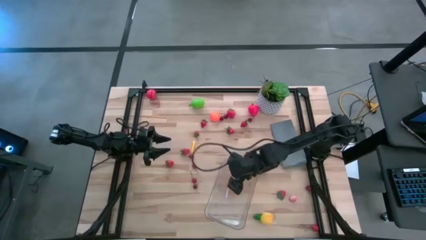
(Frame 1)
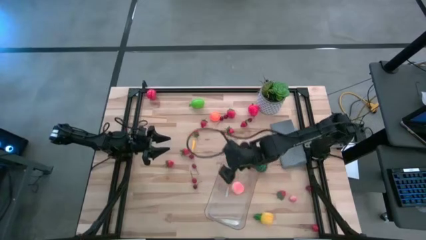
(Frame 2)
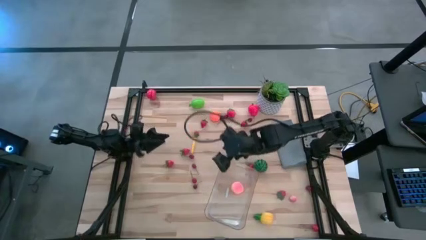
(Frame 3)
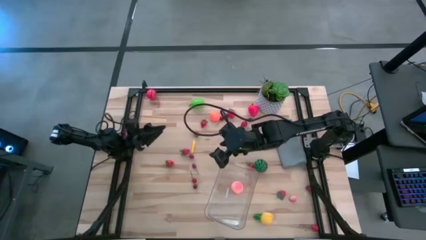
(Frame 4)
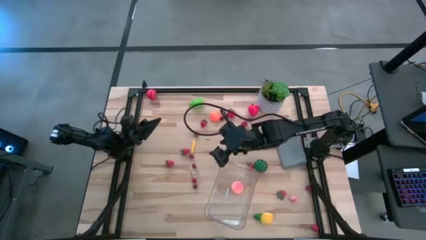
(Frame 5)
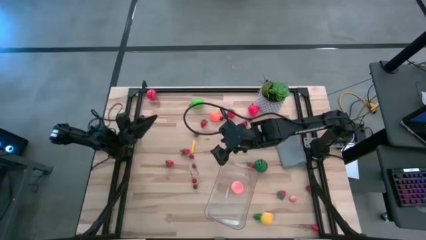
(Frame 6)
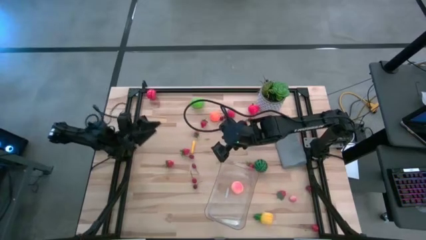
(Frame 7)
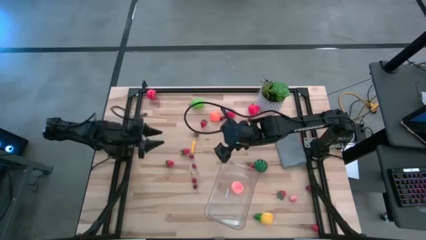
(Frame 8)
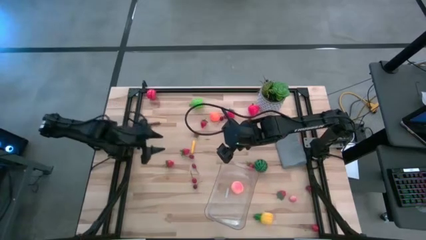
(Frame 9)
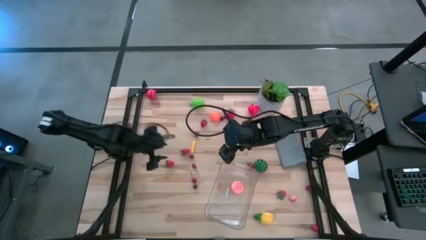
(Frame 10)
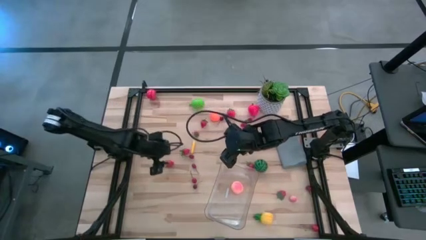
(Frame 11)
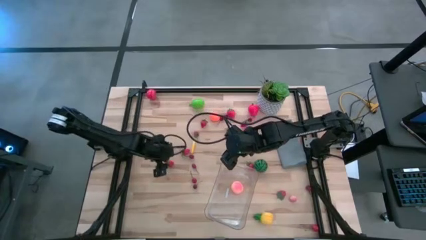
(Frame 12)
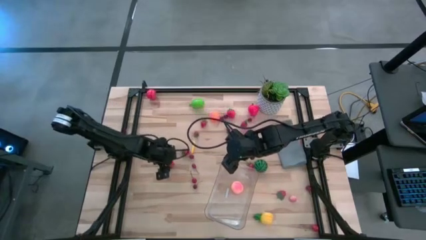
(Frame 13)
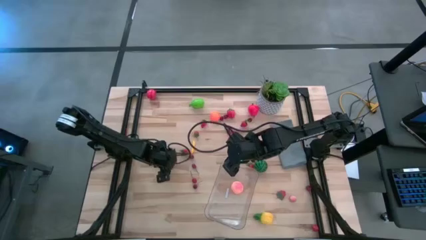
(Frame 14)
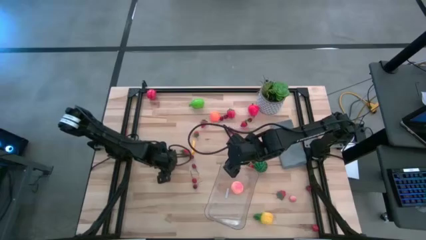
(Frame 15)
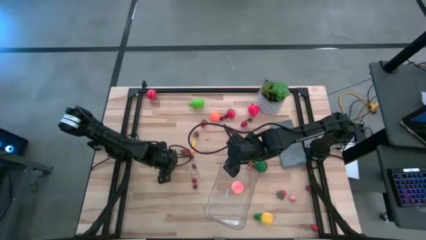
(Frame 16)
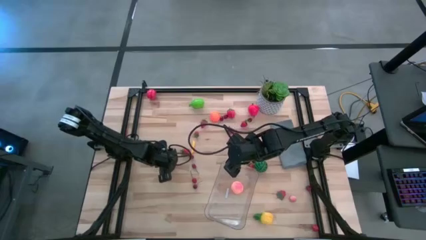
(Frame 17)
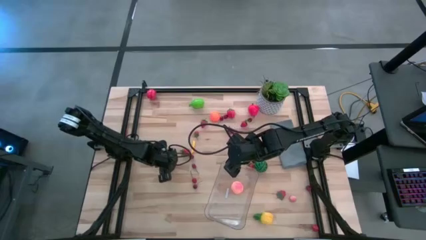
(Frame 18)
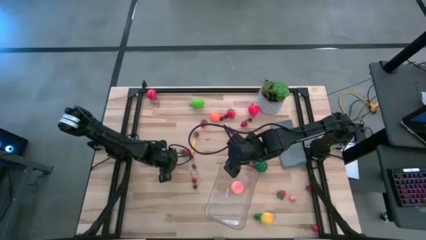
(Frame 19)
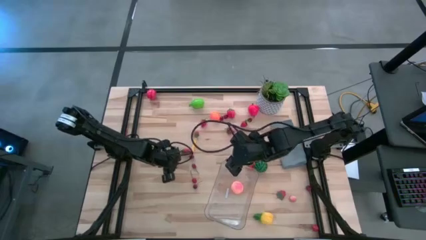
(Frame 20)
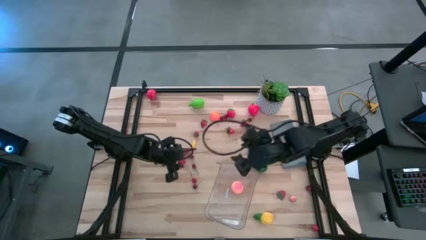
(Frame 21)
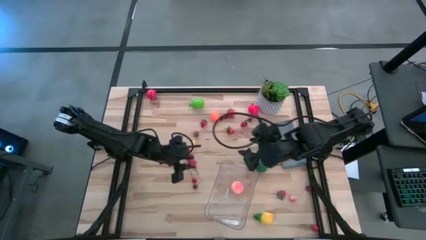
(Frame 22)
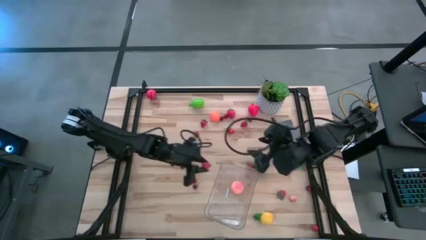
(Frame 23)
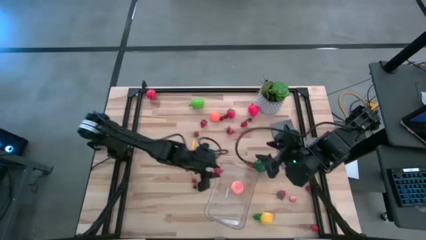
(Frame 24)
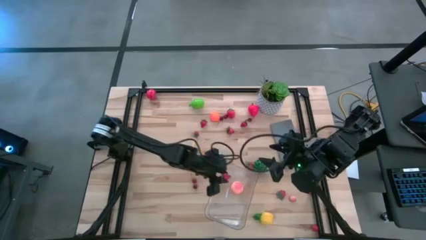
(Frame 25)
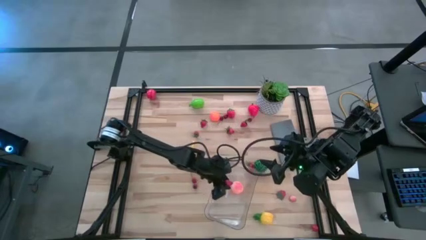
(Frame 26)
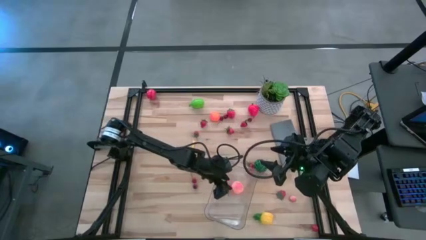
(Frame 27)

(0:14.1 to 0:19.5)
Task: Pick and placing Produce into tupperware
Put the red strawberry into the transparent basket

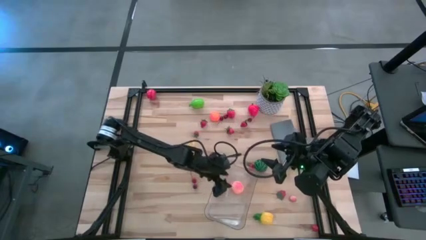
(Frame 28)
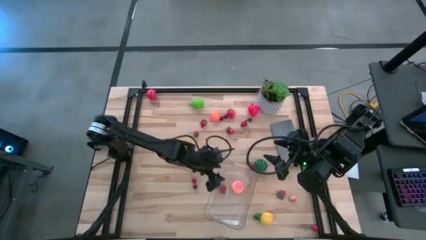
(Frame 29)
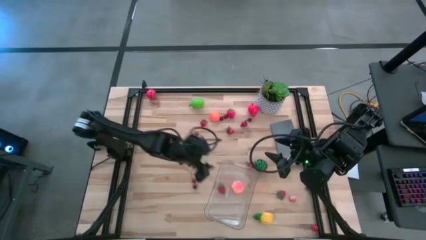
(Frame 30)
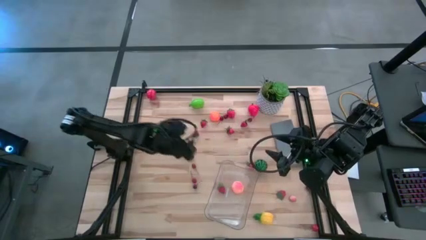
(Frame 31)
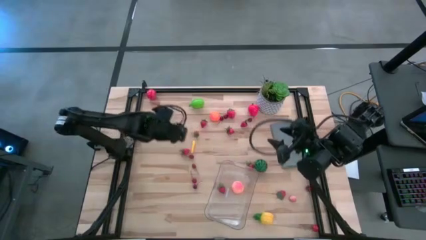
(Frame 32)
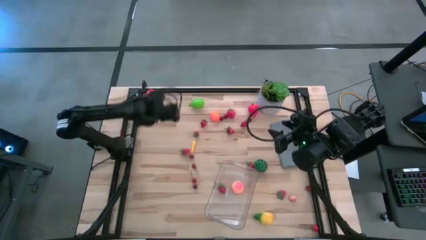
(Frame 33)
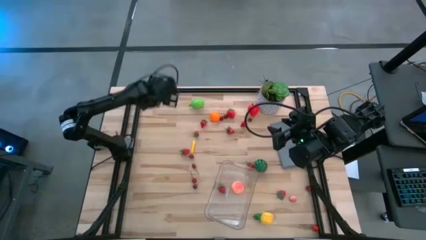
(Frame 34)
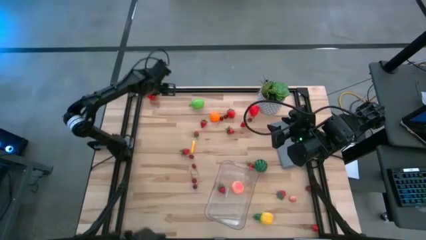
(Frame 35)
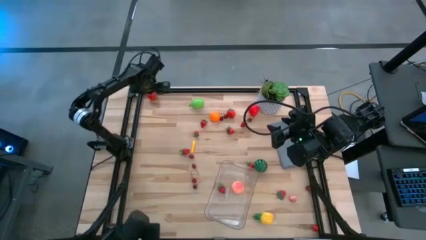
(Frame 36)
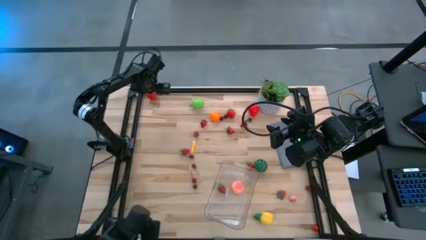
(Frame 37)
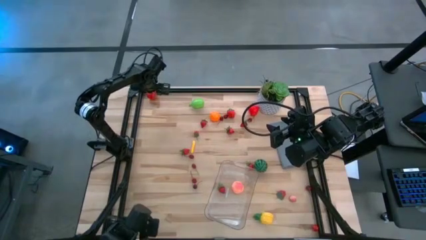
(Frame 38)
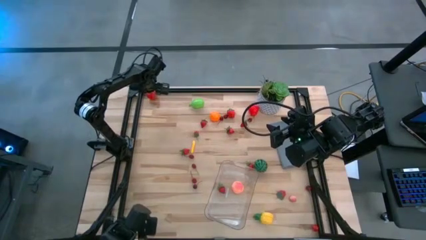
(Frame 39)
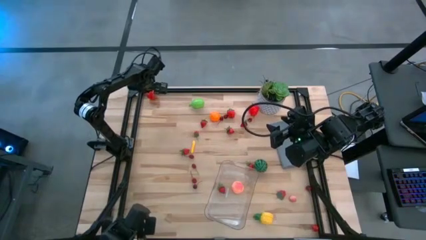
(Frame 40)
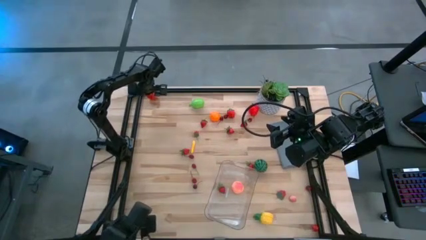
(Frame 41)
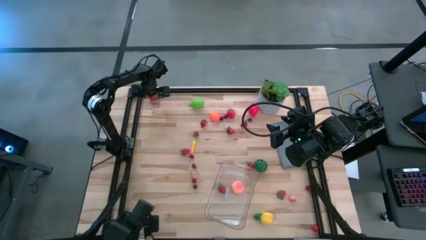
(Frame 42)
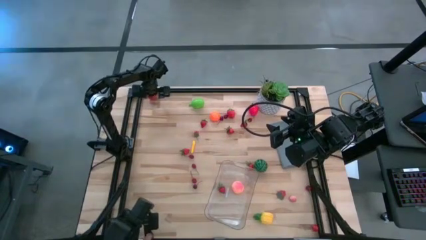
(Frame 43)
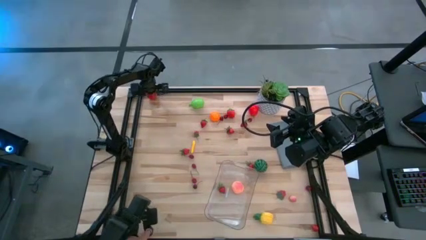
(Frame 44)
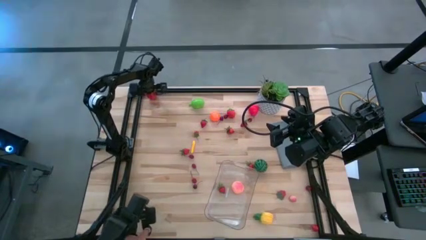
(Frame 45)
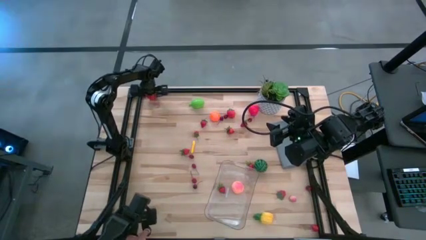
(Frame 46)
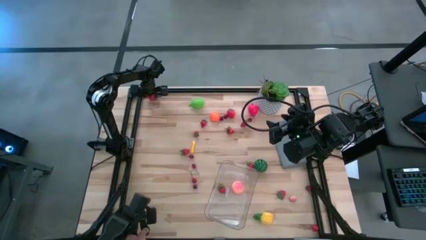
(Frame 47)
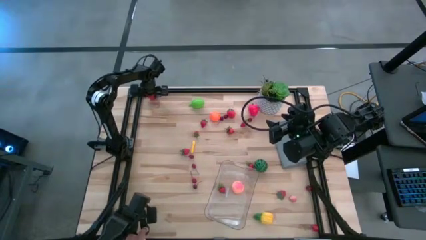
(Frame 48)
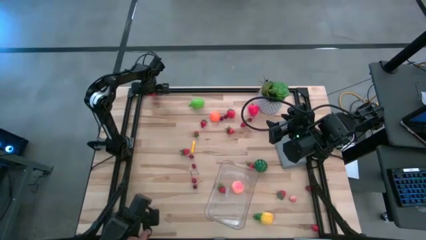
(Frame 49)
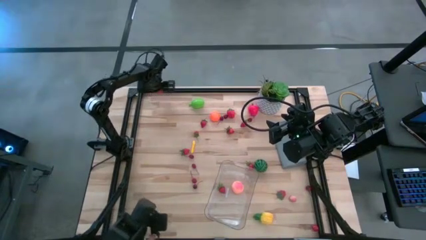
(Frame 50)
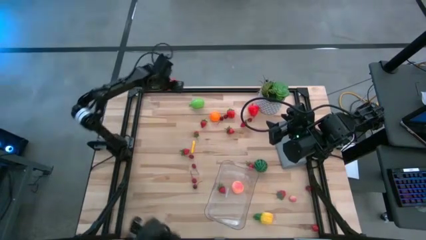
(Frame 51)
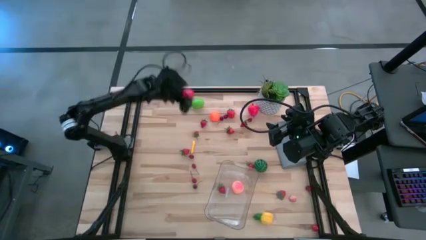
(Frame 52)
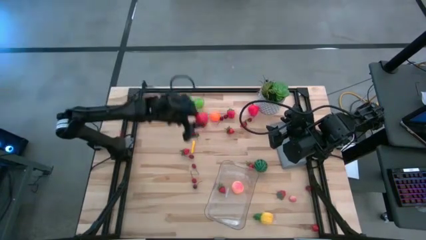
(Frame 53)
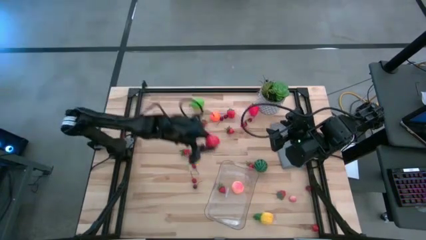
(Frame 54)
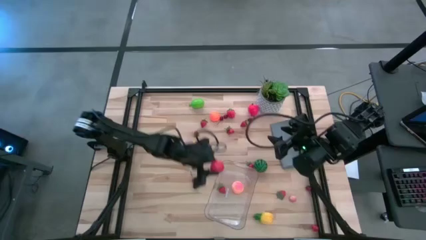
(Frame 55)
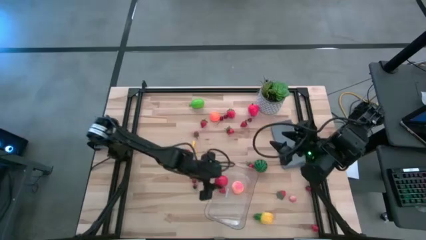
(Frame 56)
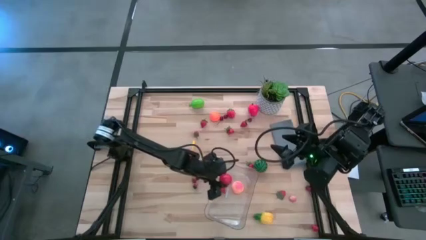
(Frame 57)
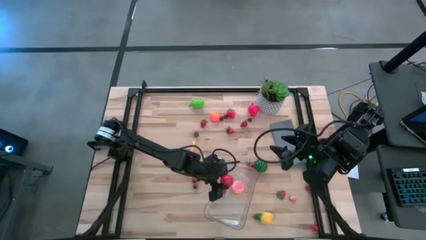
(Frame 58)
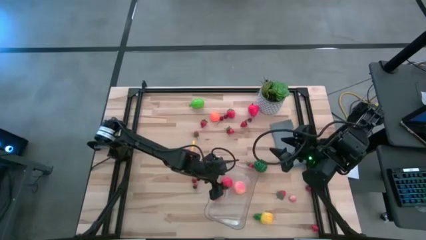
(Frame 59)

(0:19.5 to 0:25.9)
Put the red tomato into the transparent basket

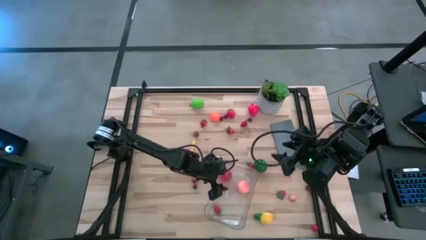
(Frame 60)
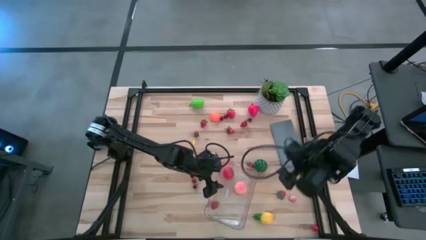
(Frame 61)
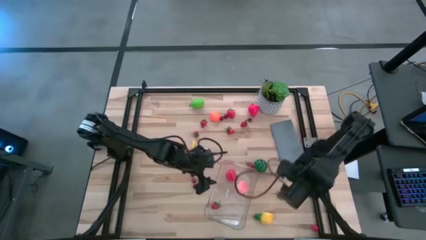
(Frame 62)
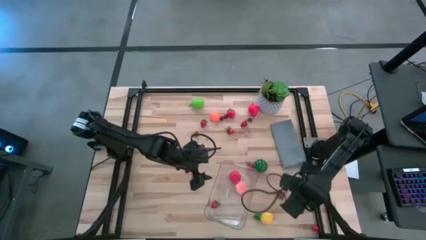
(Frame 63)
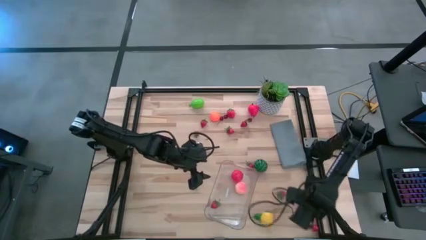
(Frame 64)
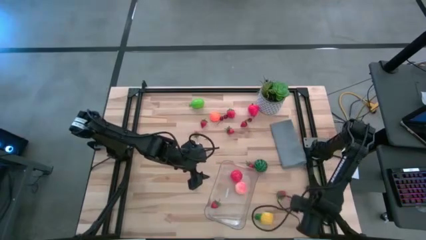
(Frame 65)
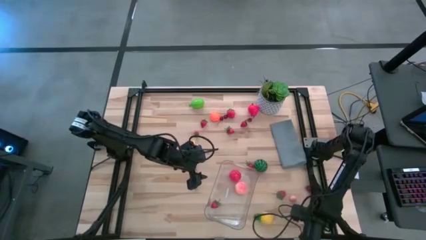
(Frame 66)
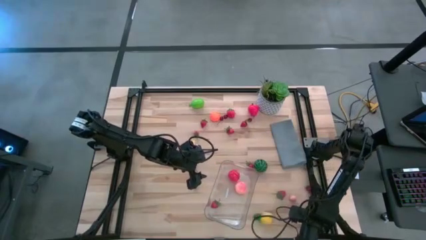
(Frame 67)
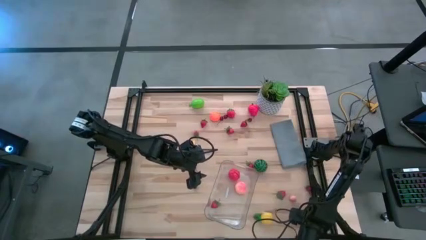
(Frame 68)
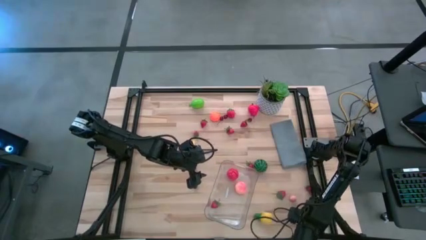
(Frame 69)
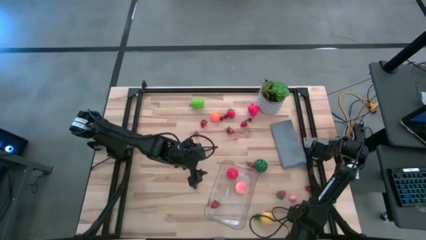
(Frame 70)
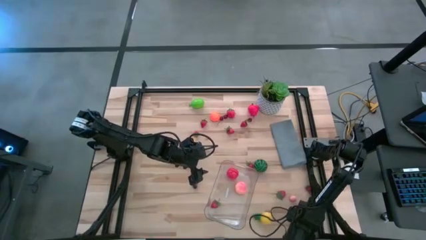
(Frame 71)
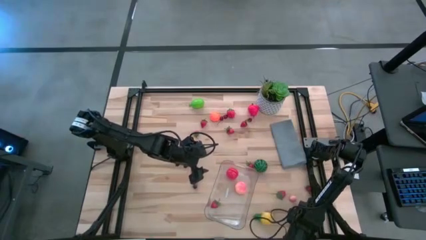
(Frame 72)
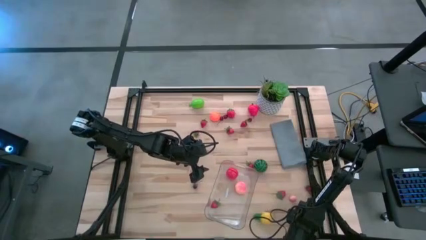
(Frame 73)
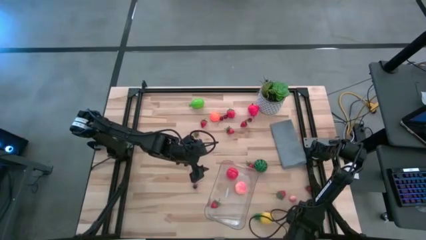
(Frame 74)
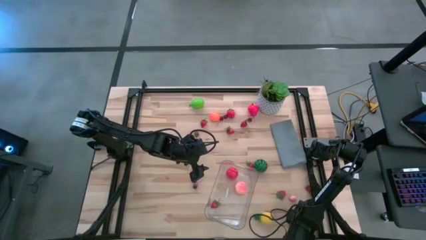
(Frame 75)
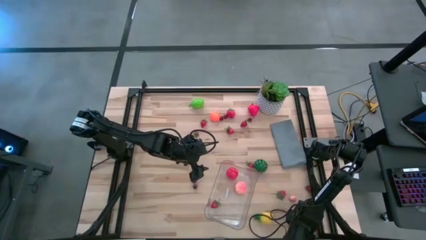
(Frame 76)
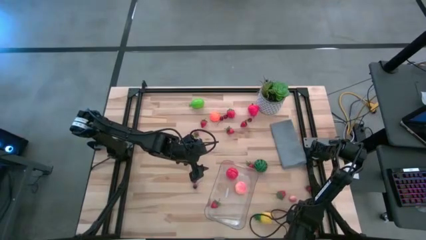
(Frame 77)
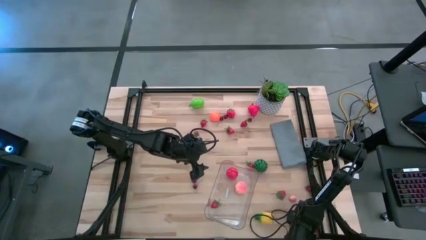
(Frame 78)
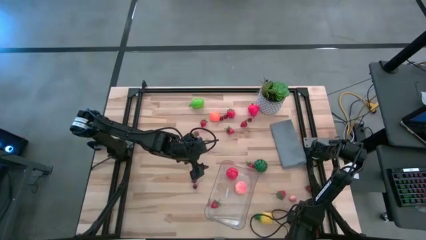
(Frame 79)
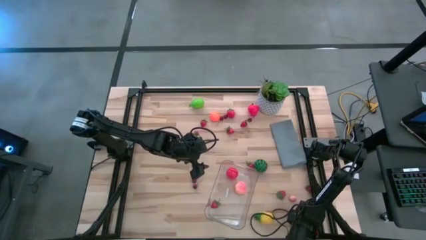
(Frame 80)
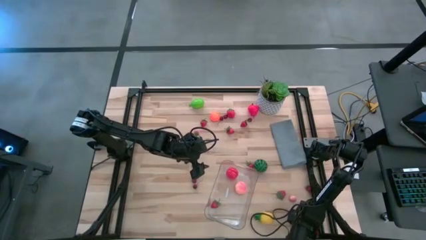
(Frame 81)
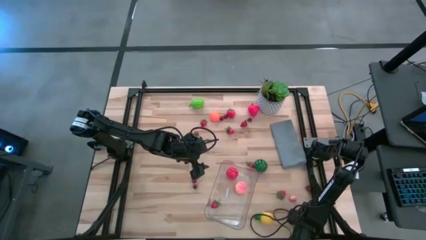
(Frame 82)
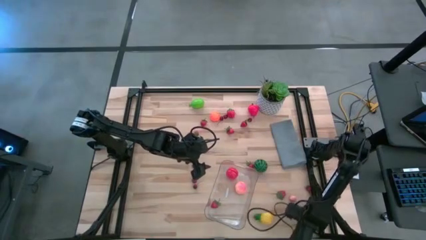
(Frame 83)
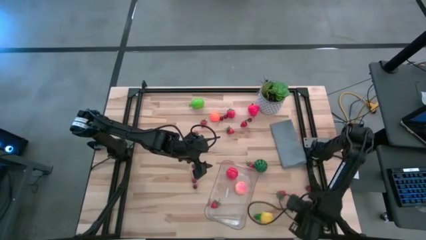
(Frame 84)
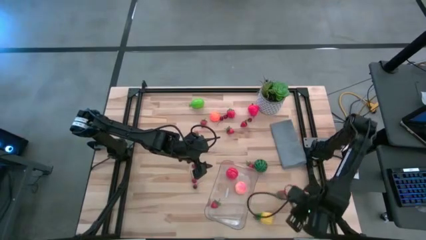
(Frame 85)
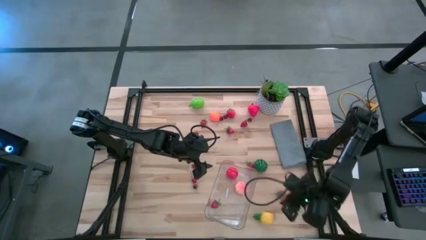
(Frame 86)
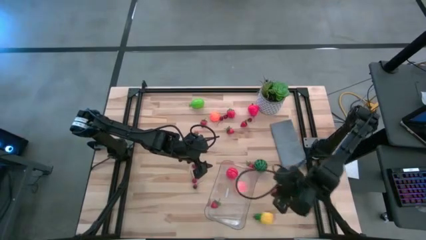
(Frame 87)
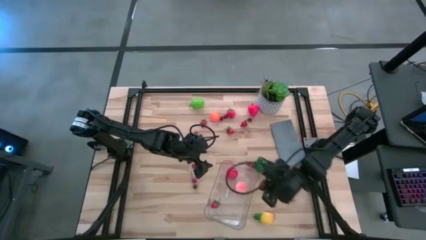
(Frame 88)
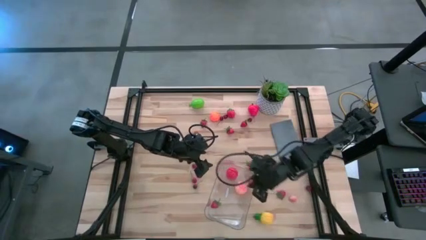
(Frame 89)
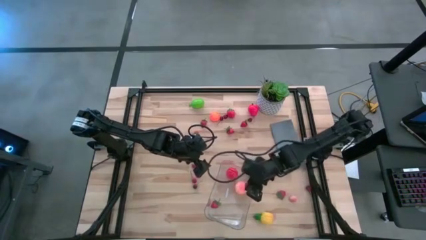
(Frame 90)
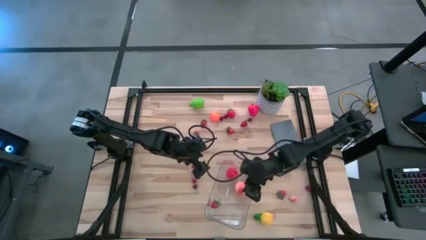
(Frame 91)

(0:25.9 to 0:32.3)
Put the red cherry into the transparent basket
